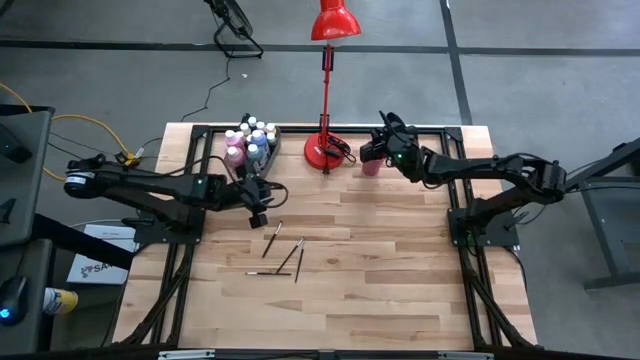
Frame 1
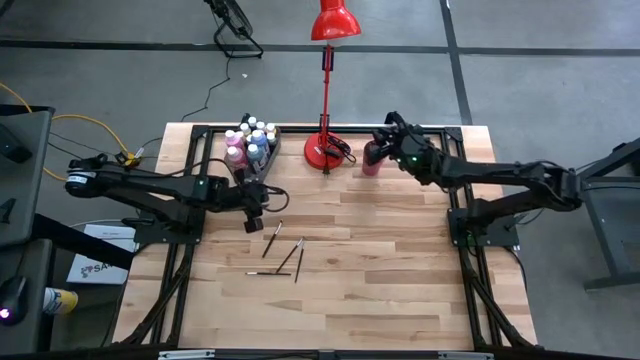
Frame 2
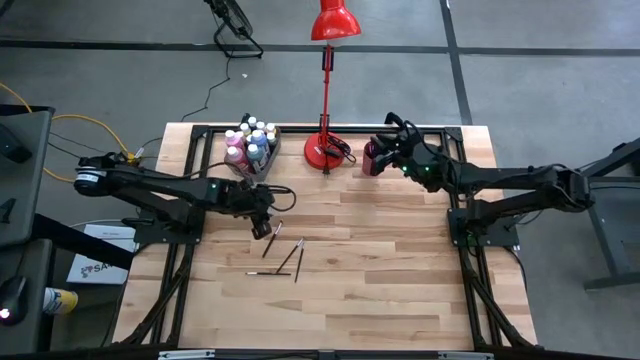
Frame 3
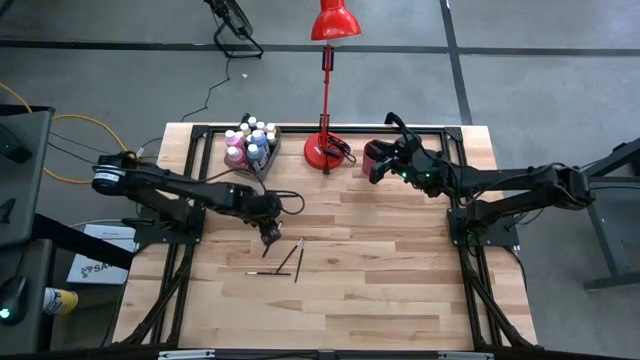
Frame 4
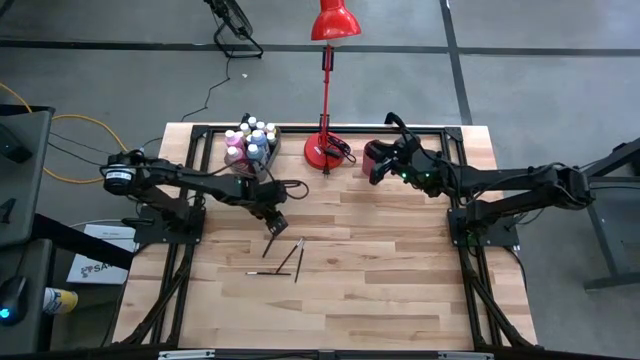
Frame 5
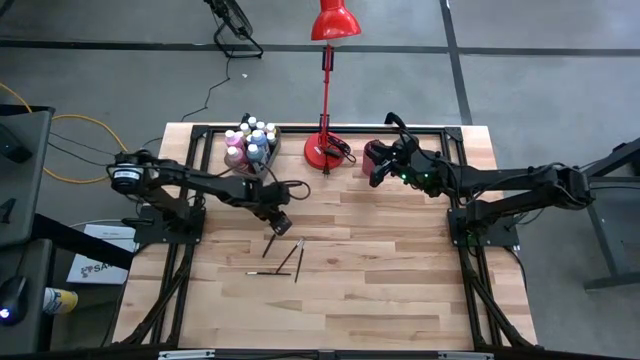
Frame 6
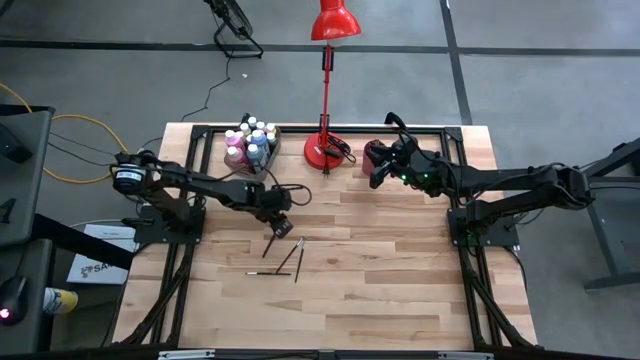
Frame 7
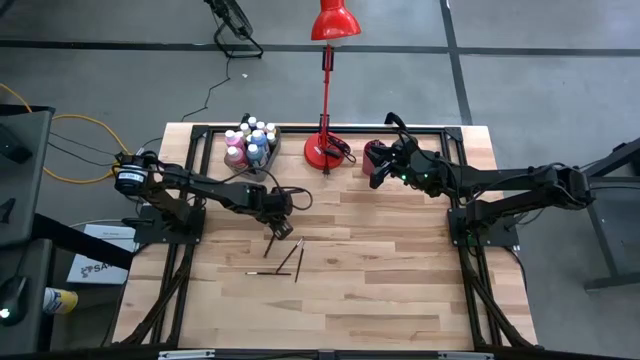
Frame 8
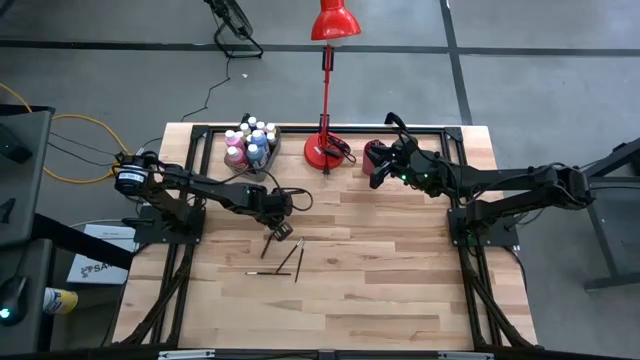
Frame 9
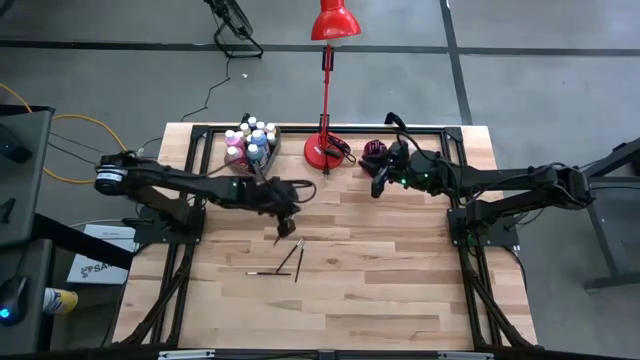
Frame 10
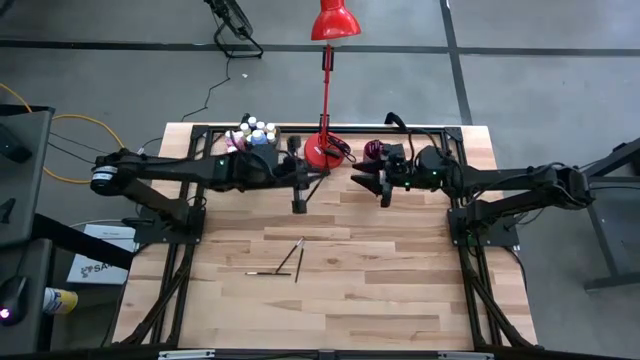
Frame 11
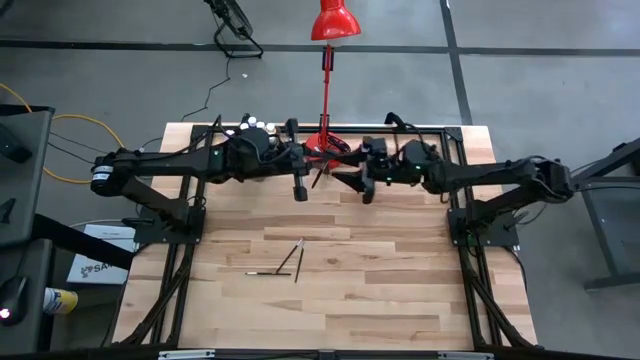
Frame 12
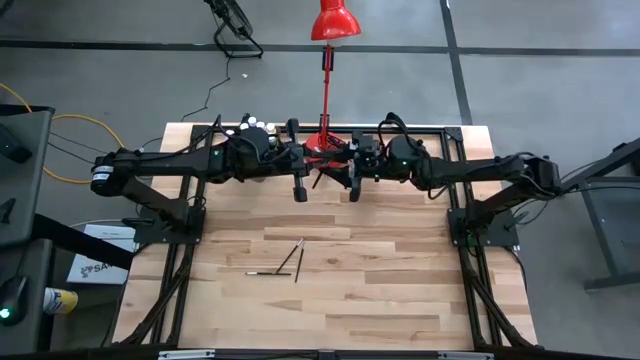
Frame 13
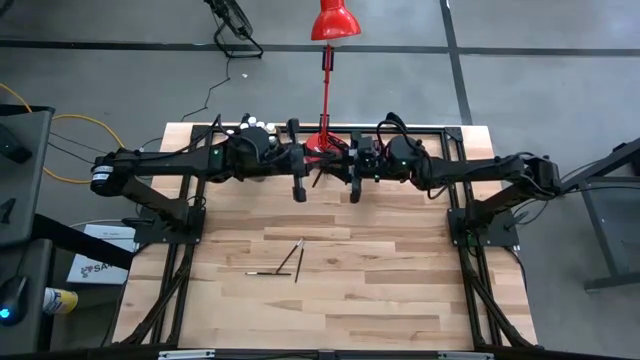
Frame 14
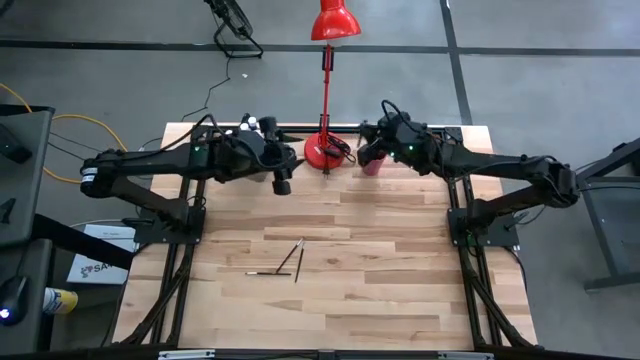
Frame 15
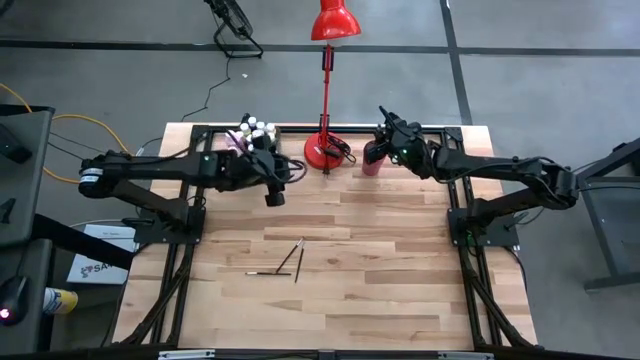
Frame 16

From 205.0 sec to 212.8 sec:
Task: Pick & Place Paint Supplies
Put the paint brush into the cup

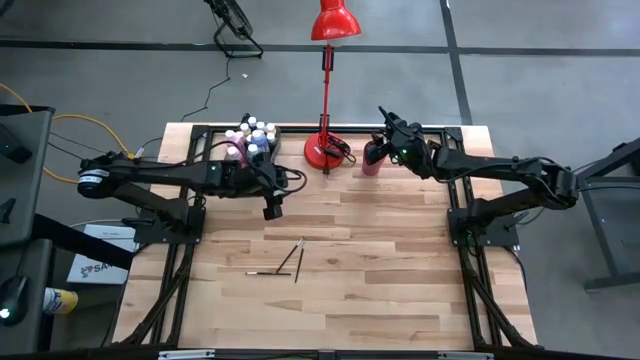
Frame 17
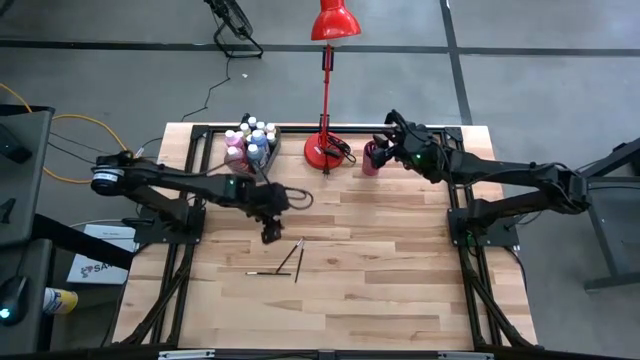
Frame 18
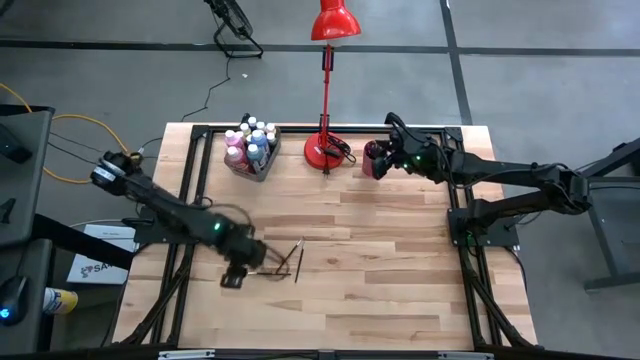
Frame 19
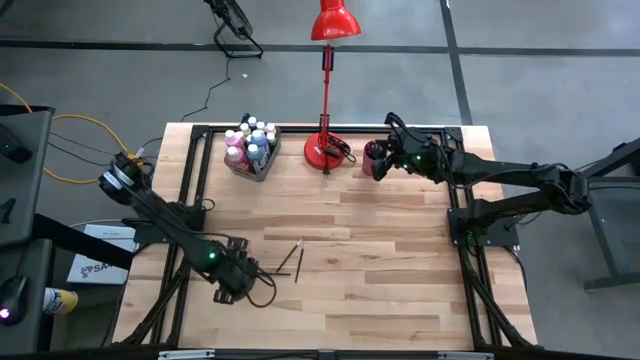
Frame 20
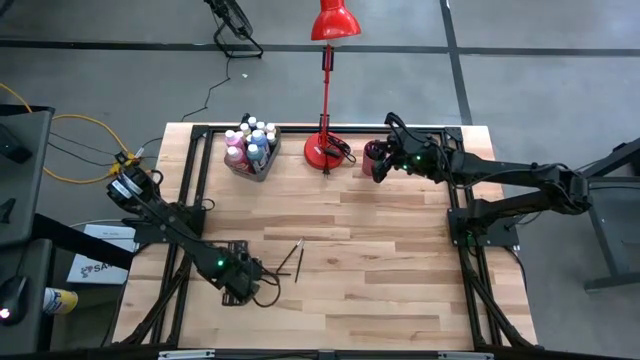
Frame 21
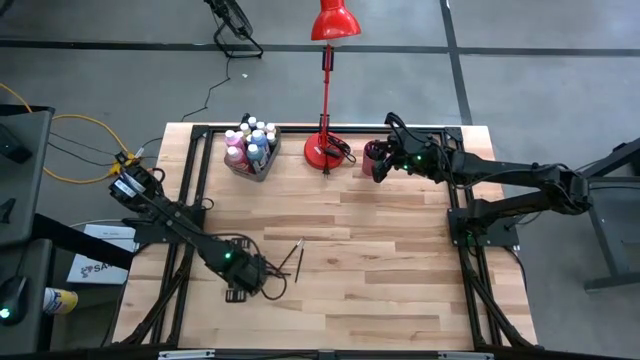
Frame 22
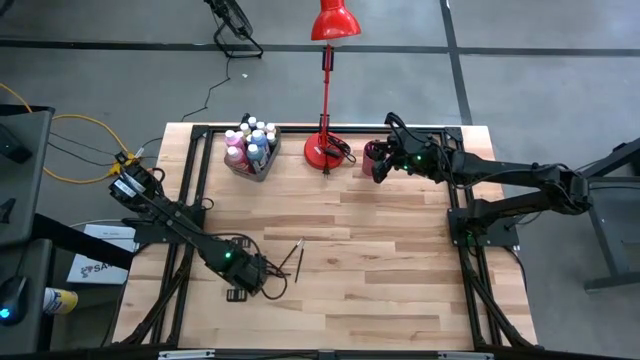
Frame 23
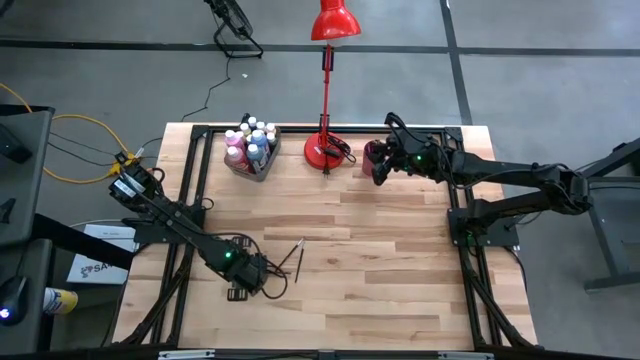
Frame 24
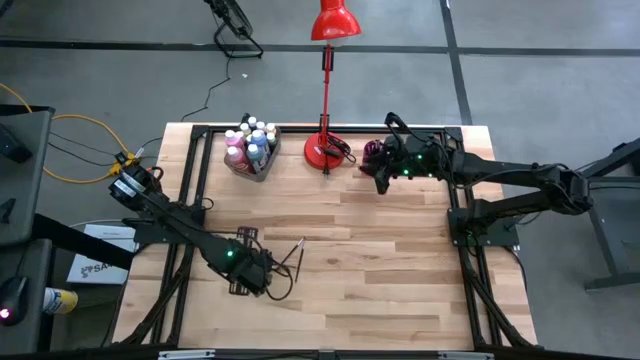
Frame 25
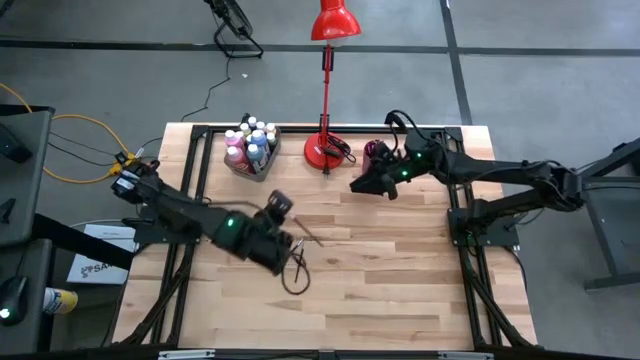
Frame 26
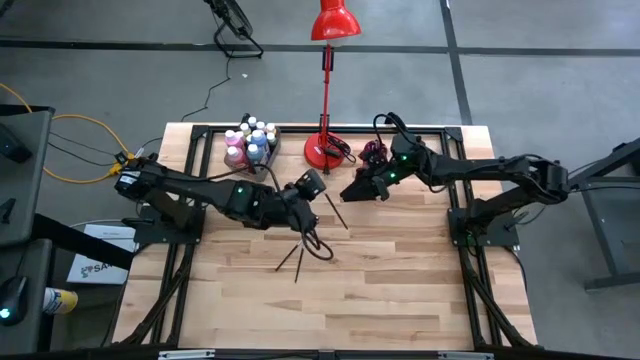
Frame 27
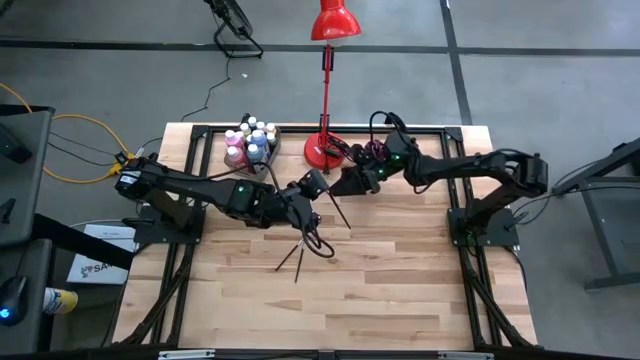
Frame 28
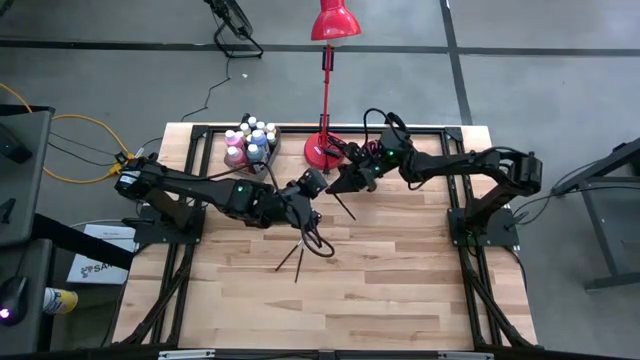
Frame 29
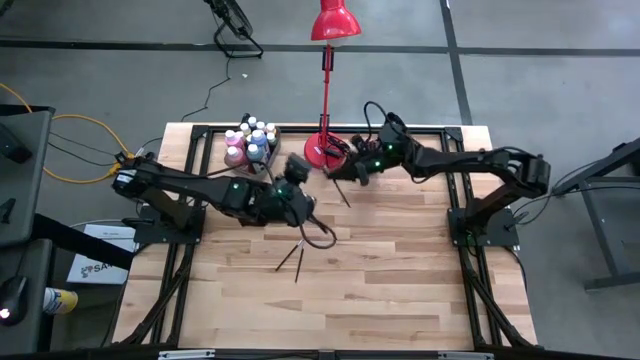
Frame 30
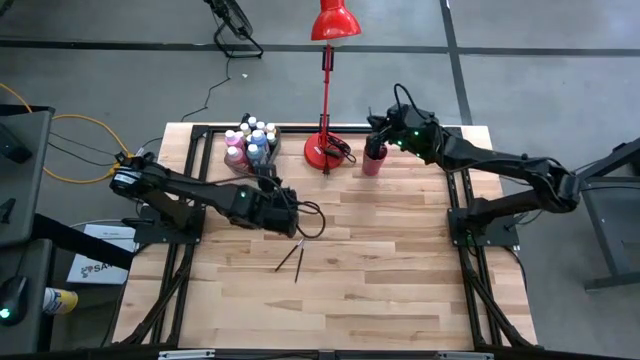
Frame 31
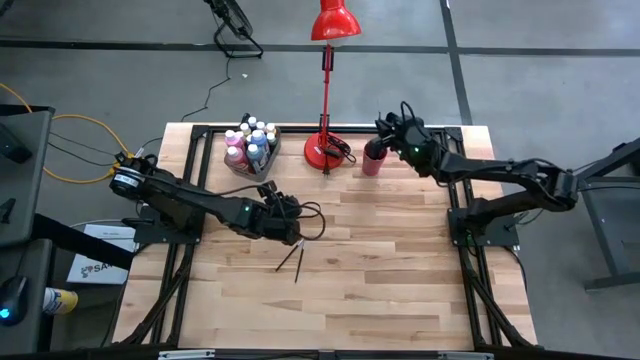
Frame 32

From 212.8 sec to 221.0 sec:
Put the paint brush into the cup

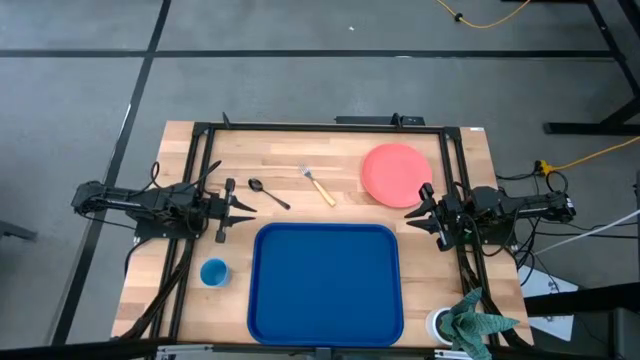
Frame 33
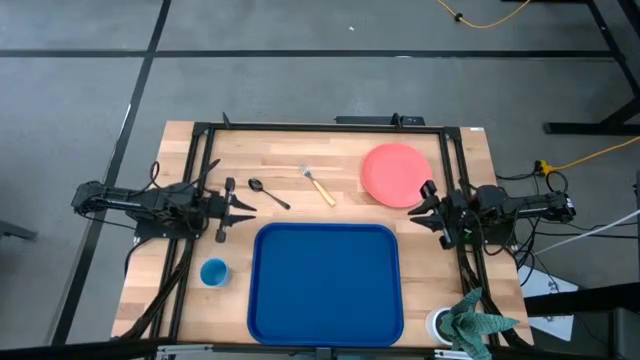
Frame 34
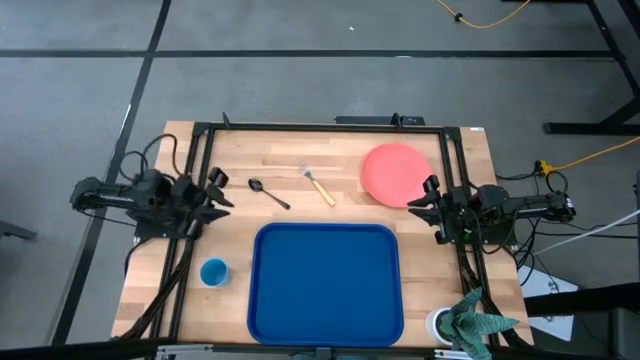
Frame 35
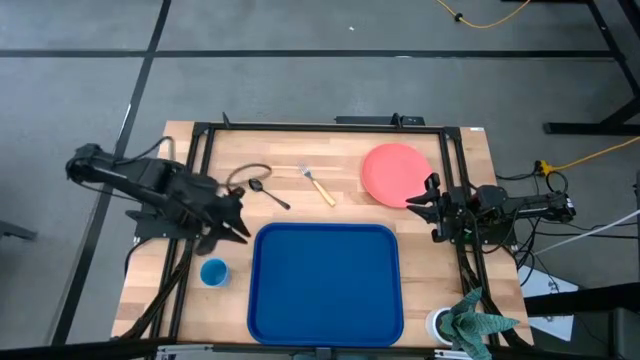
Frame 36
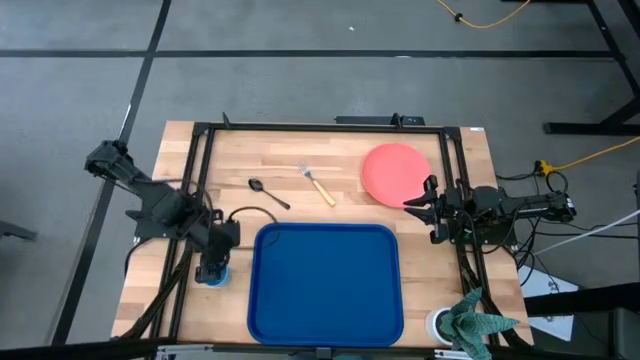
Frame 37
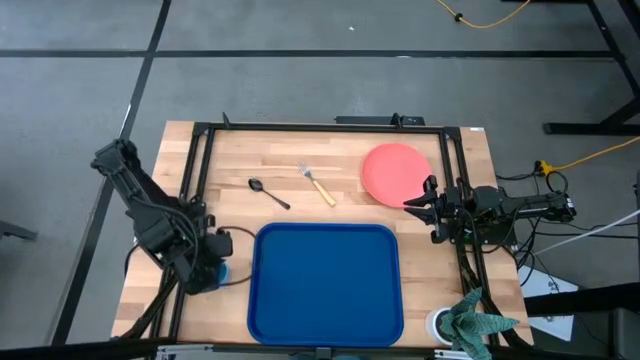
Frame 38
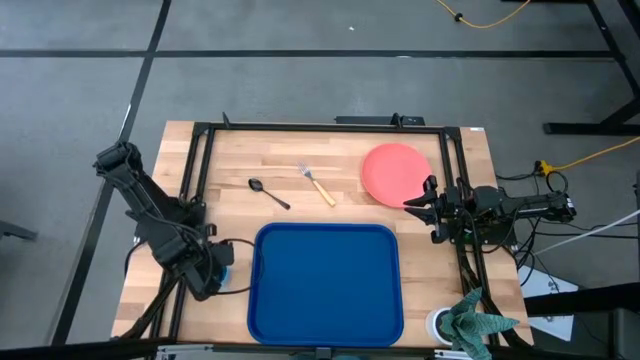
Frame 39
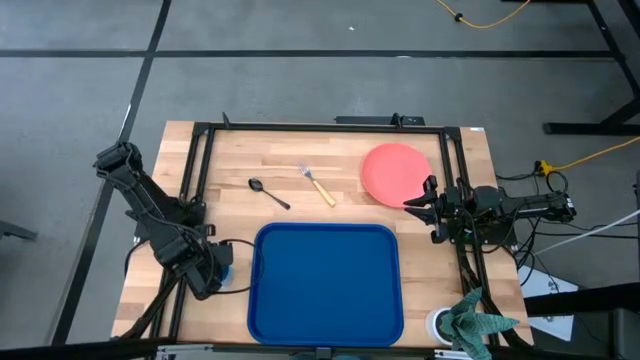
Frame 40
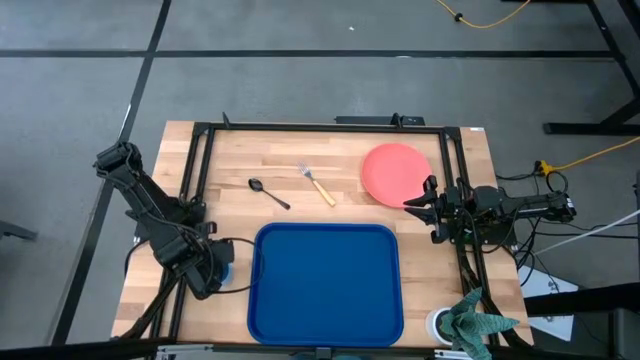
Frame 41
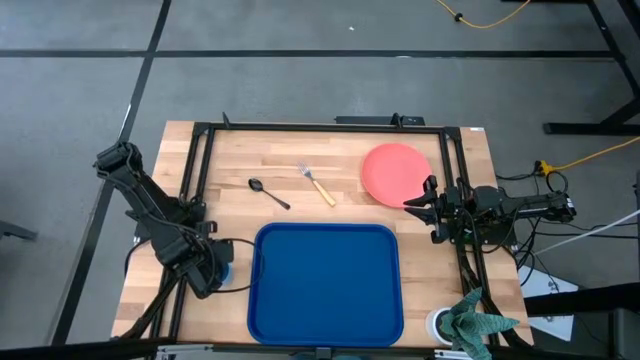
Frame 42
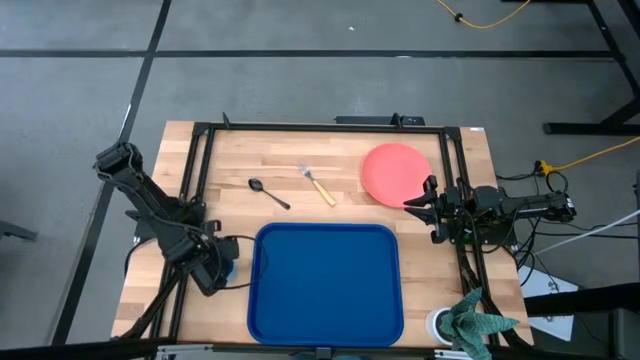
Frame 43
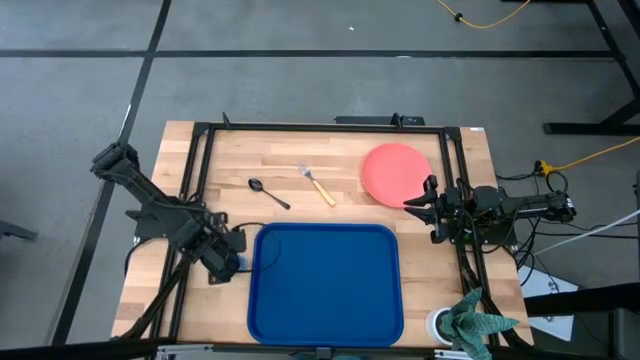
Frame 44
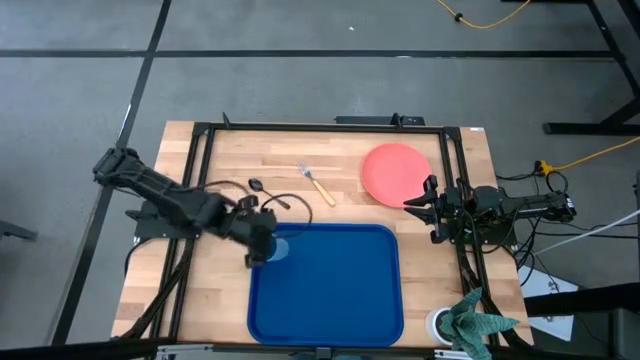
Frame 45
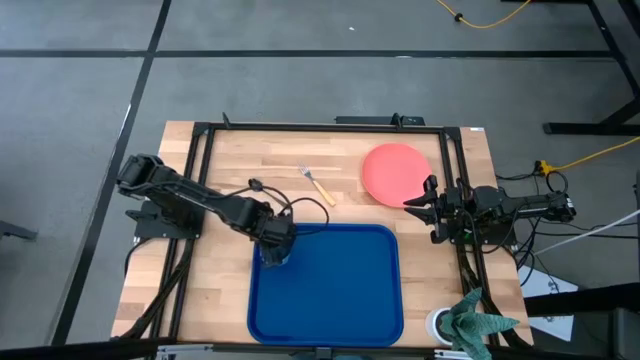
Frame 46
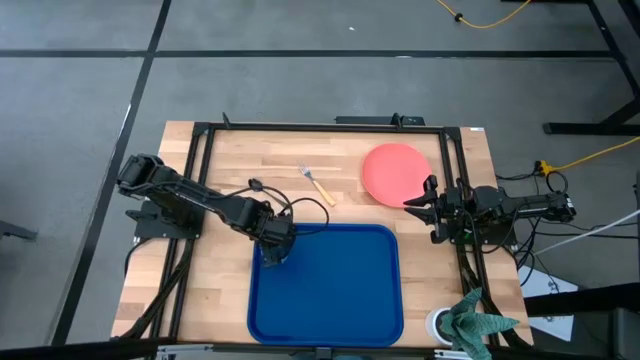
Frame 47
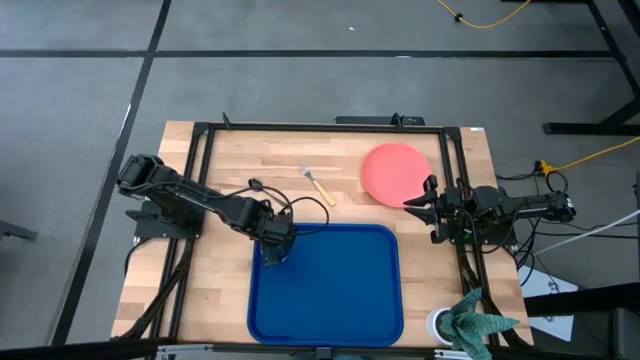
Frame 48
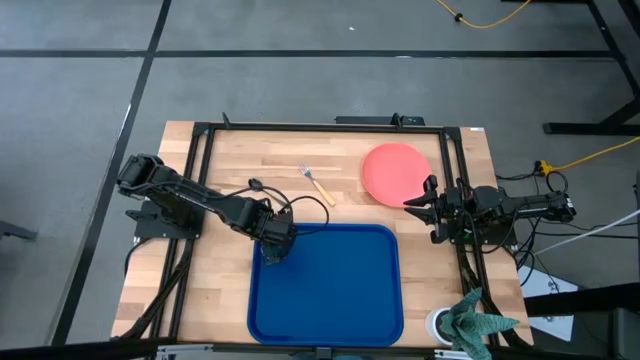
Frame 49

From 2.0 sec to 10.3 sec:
Task: Pick and place plate/cup/fork/spoon on tray
Put the blue cup on the blue tray
